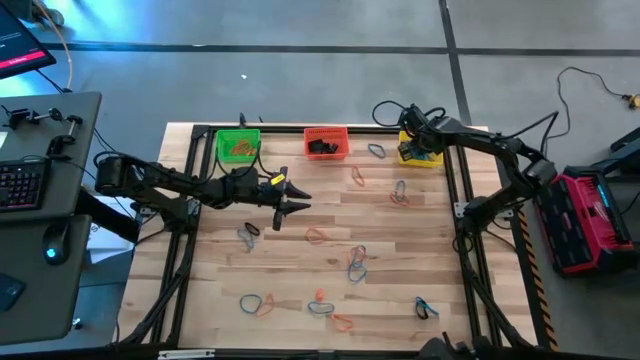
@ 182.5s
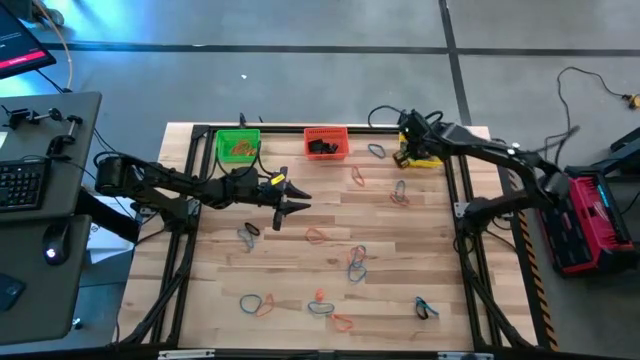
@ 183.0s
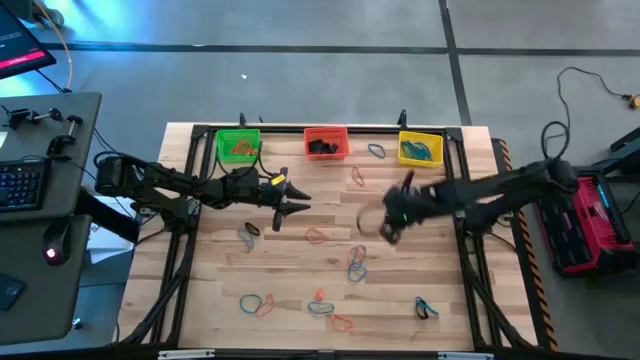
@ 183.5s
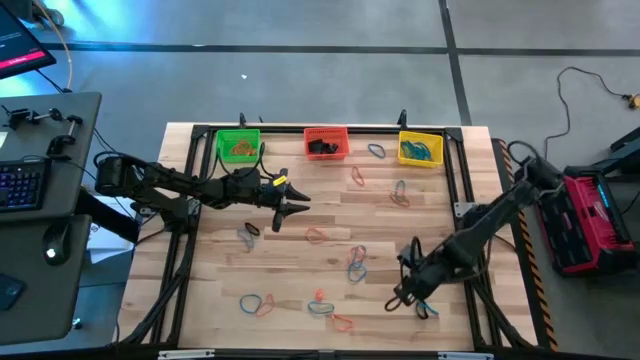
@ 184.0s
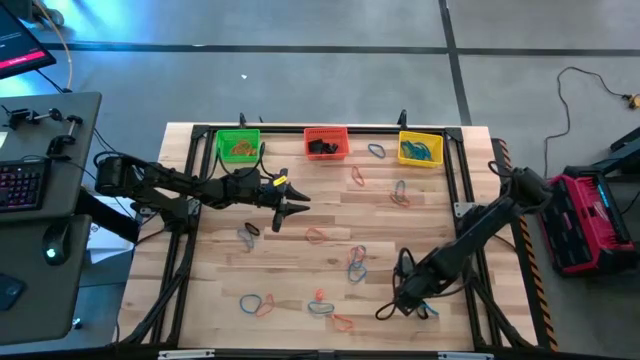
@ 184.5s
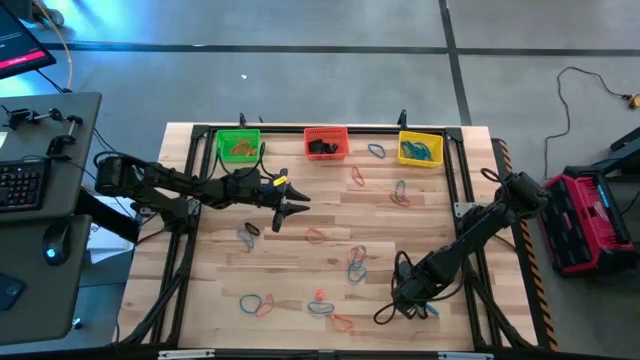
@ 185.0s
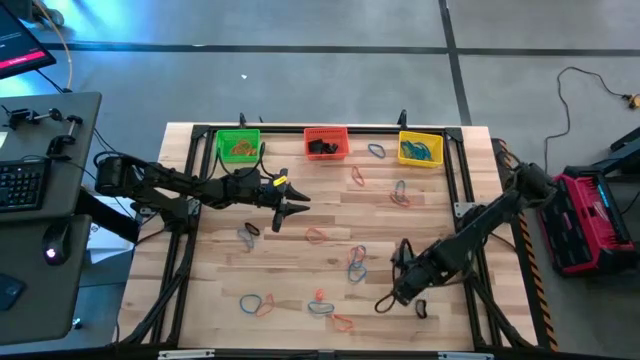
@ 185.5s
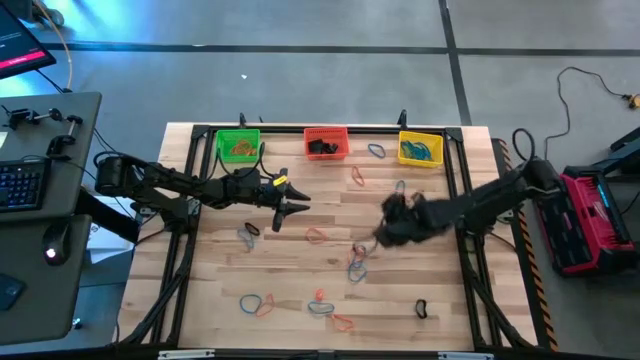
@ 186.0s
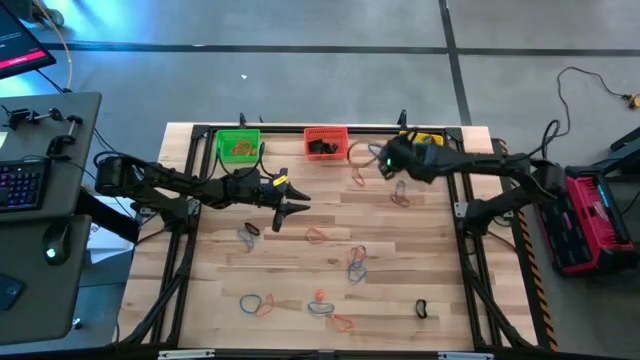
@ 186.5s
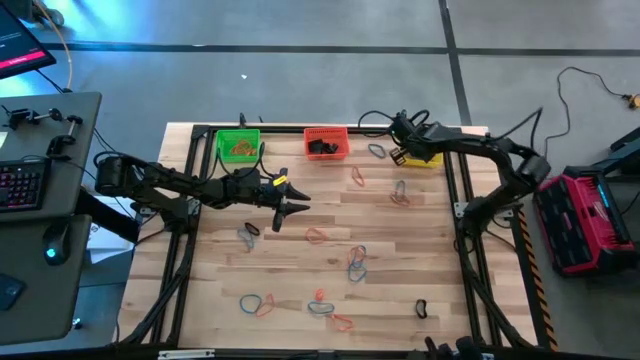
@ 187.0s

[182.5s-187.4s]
Task: Sort rubber bands into baskets
Put the blue rubber band into the yellow bin

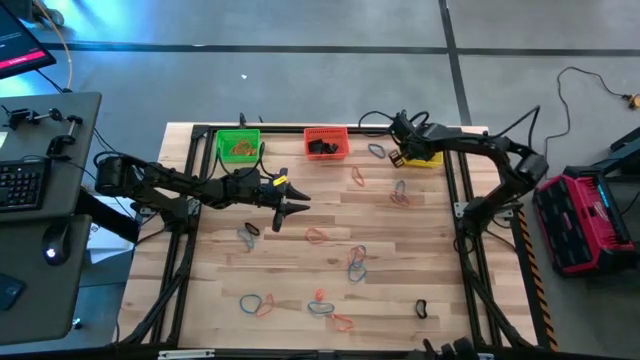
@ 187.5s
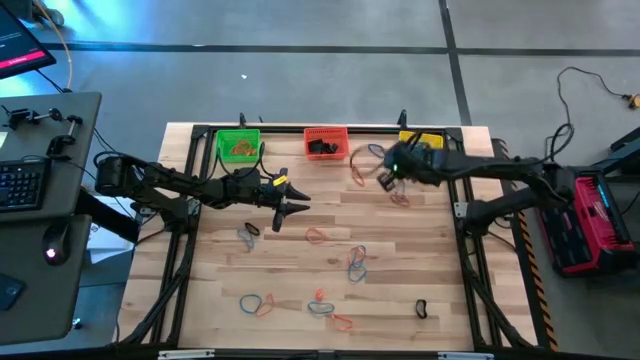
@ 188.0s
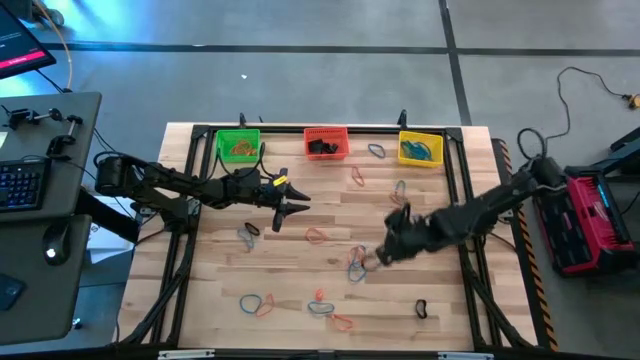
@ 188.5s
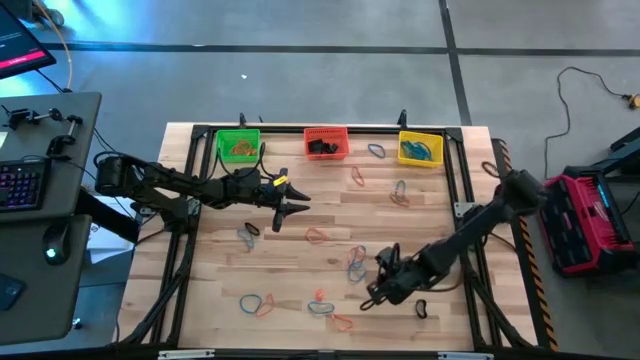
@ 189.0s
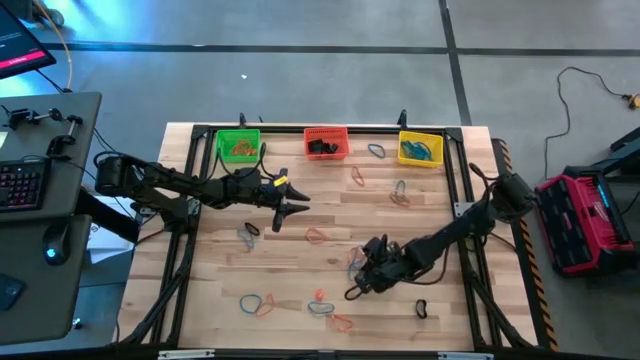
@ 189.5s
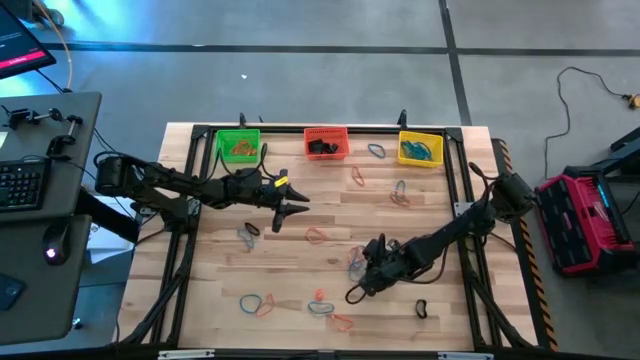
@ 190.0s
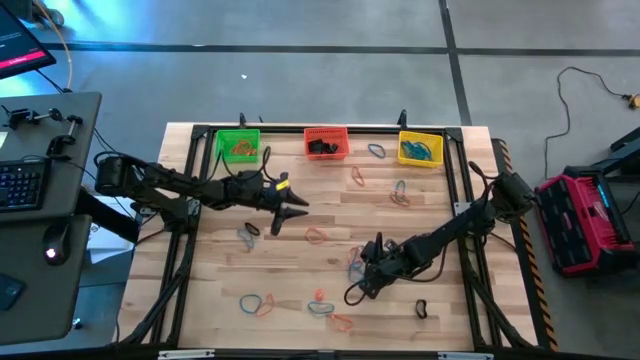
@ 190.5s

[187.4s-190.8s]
Put the blue rubber band into the yellow bin

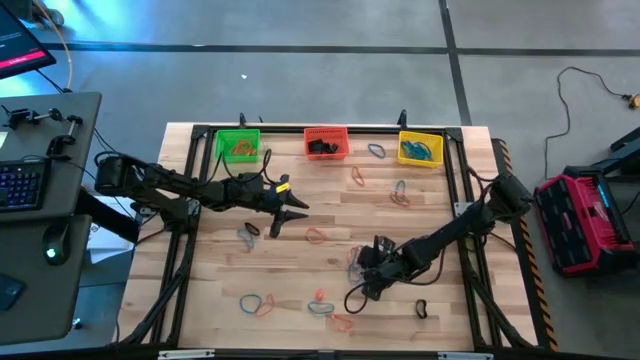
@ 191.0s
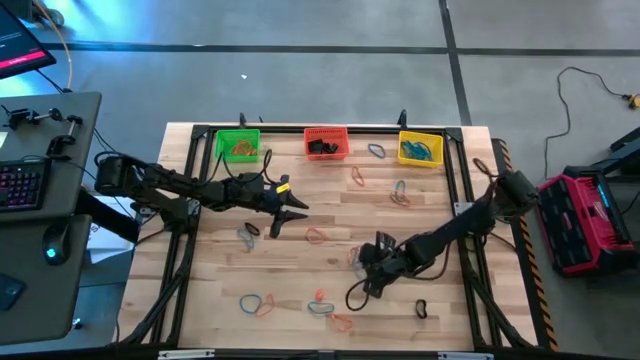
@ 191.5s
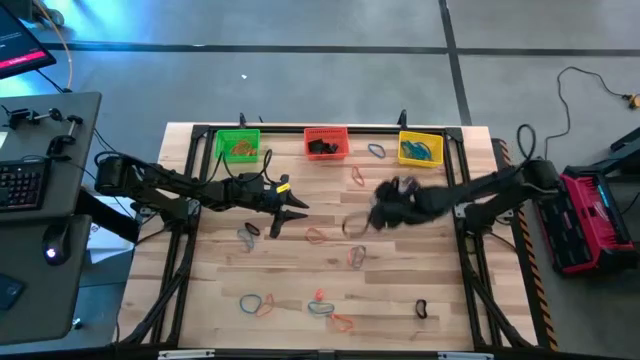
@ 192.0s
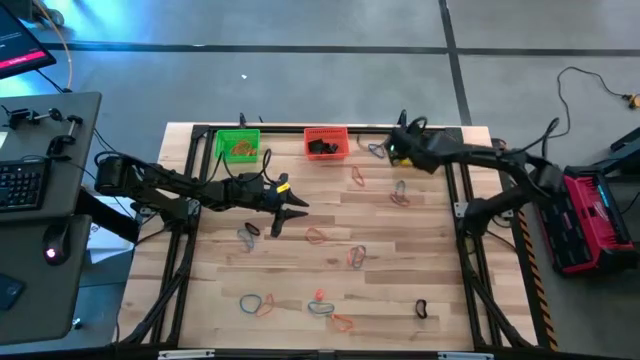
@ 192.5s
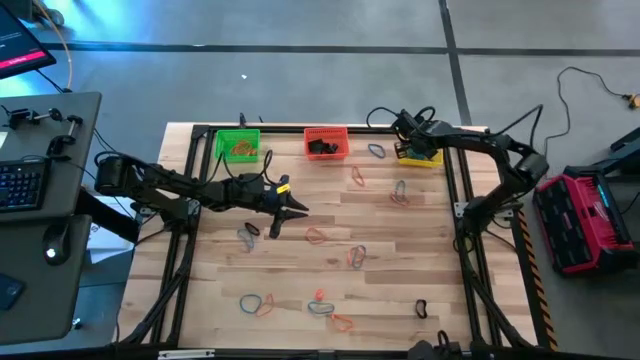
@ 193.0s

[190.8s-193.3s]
Put the blue rubber band into the yellow bin

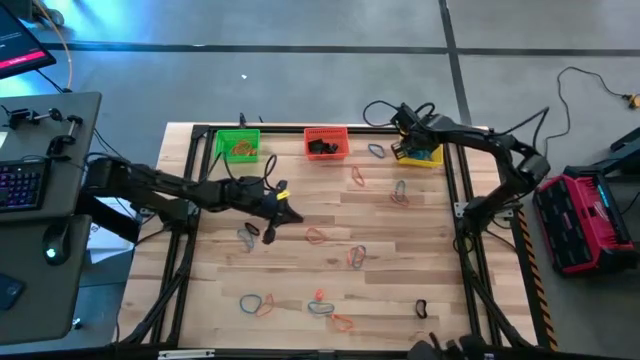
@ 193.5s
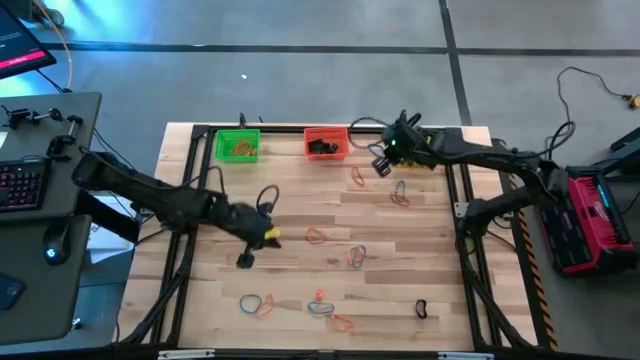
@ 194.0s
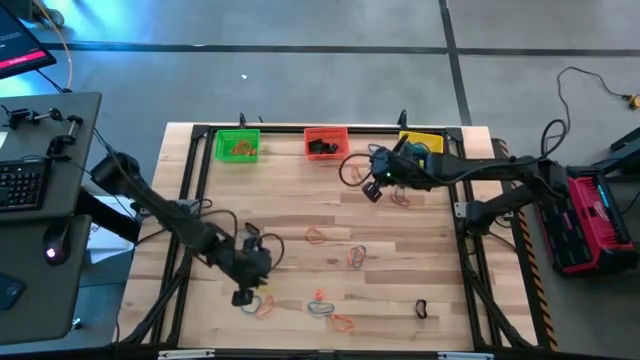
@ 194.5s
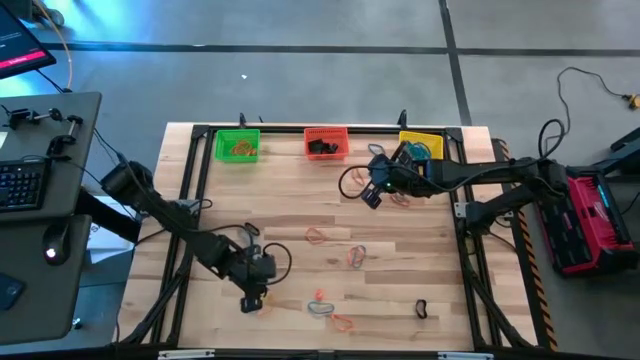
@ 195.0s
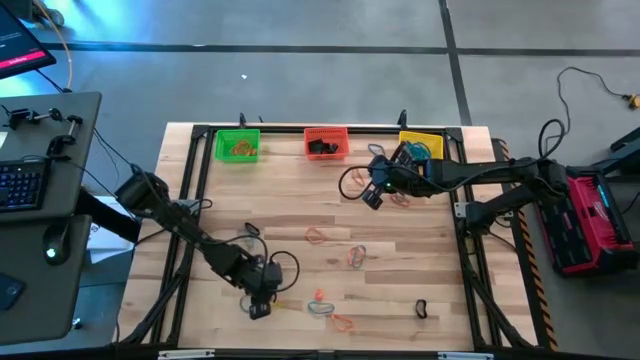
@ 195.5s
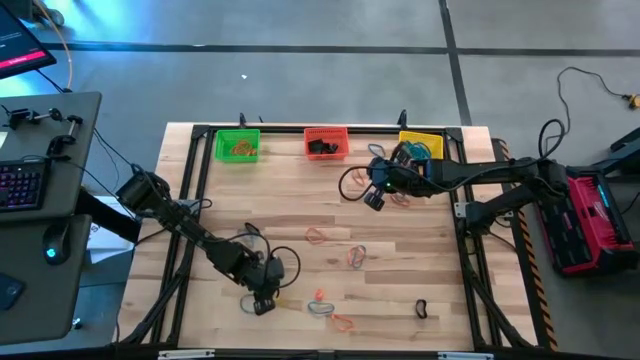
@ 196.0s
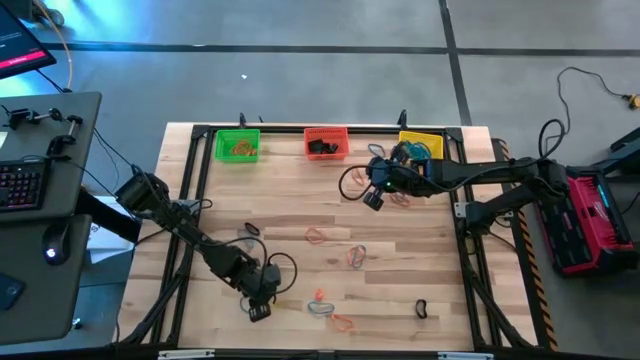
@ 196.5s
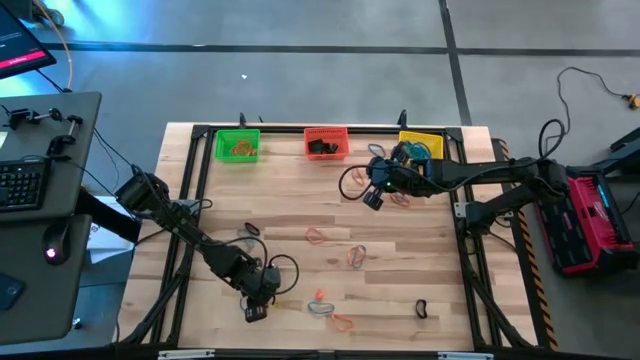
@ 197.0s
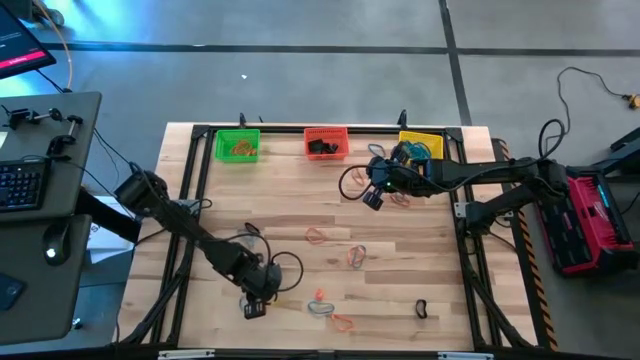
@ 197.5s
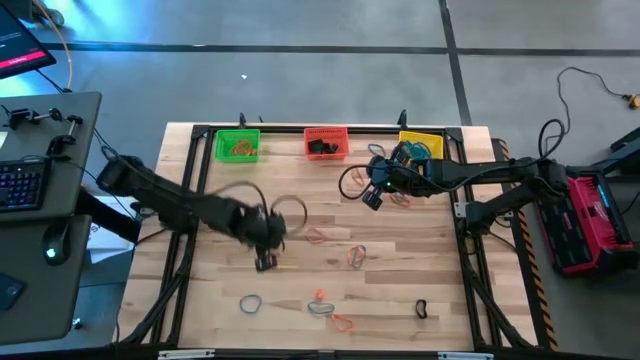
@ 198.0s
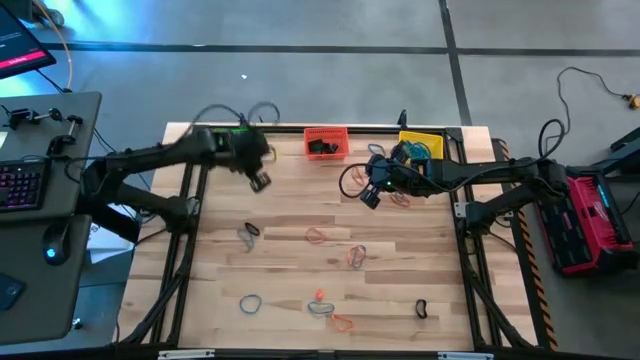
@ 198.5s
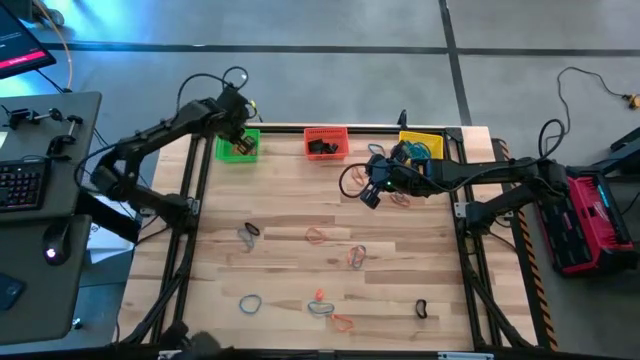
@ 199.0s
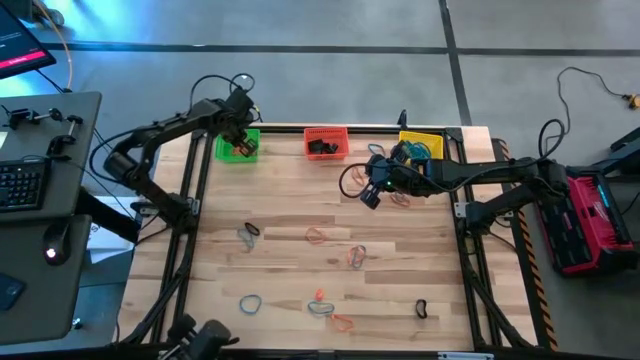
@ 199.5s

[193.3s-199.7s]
Put the orange rubber band into the green bin

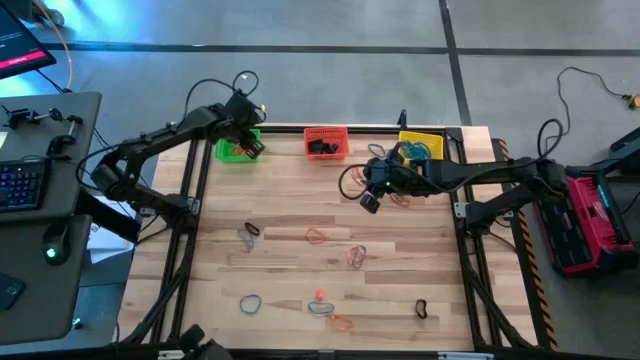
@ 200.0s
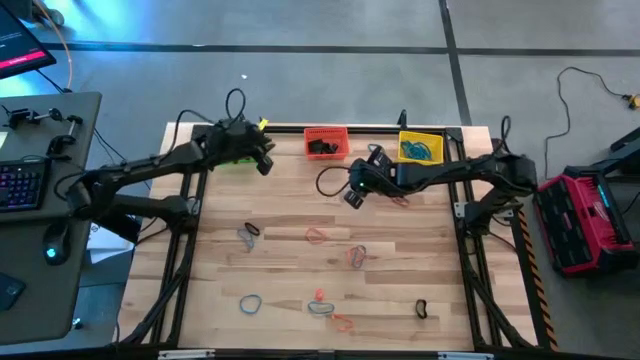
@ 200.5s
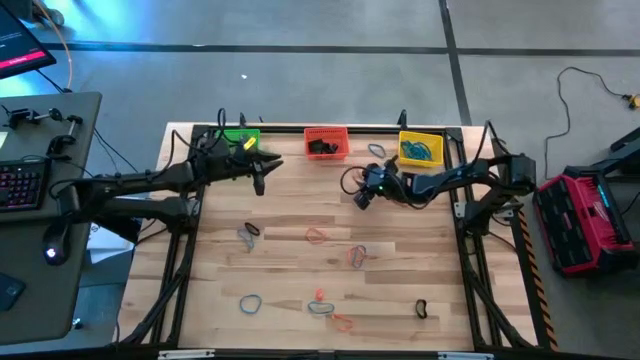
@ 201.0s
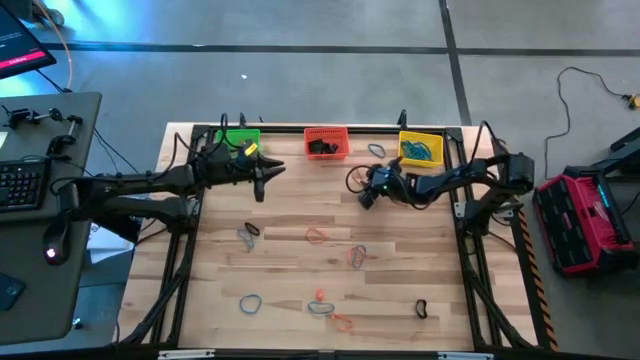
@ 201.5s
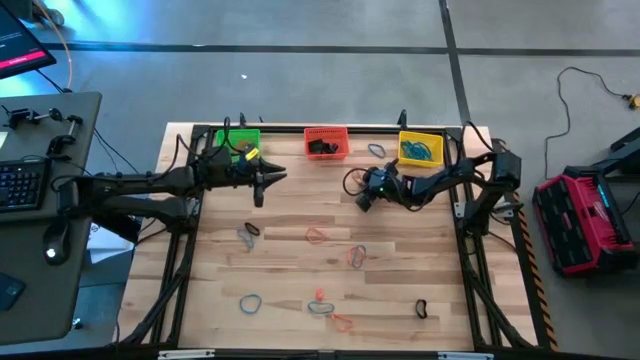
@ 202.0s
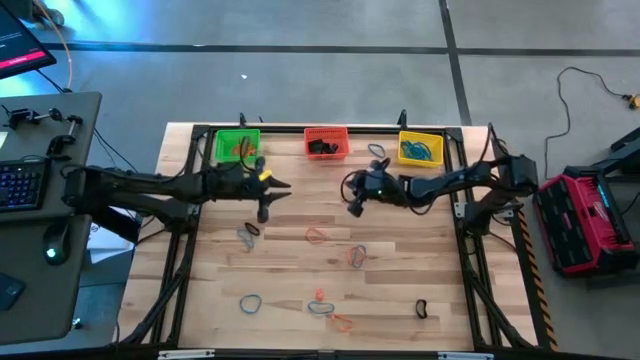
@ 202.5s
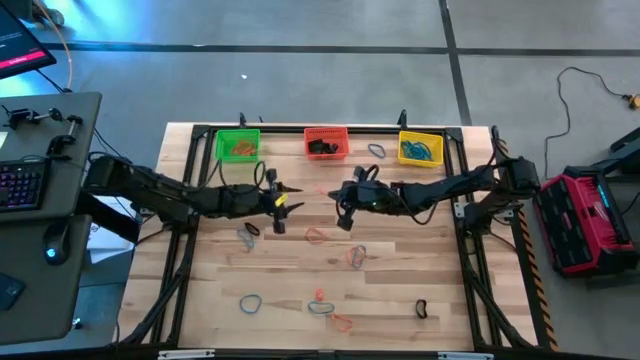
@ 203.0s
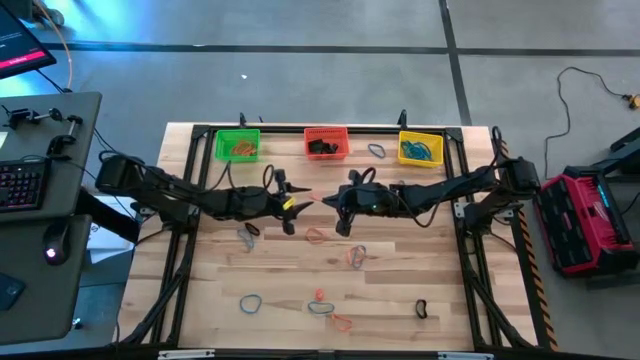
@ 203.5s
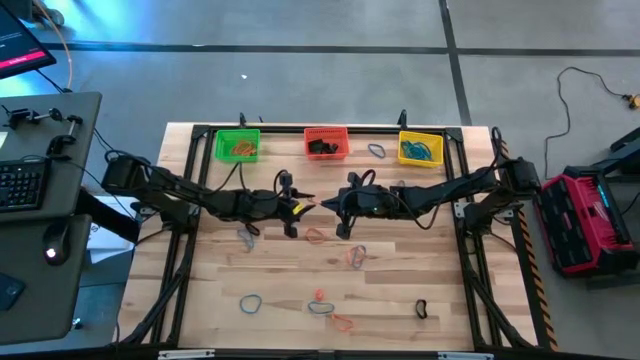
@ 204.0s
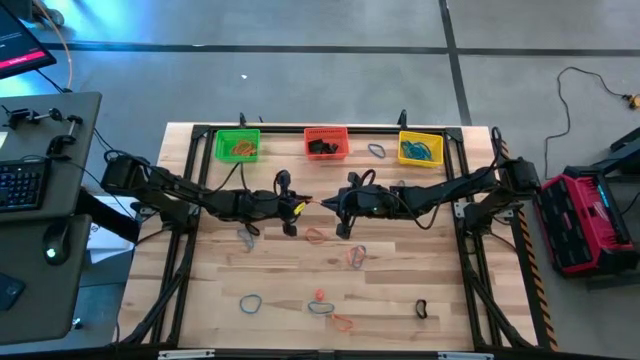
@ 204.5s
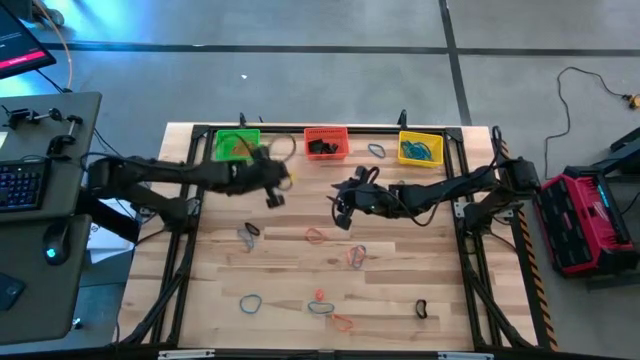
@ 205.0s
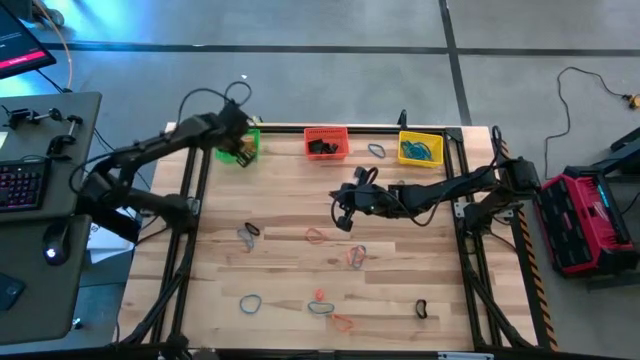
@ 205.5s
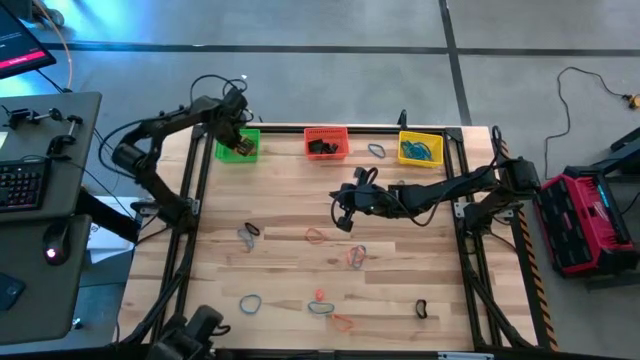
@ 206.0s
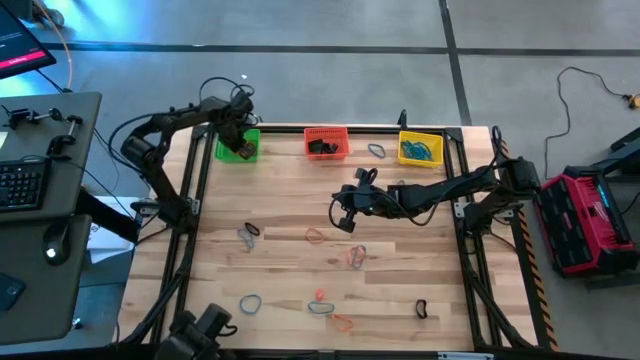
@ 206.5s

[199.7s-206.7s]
Put the orange rubber band into the green bin
